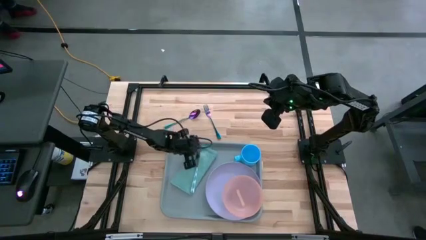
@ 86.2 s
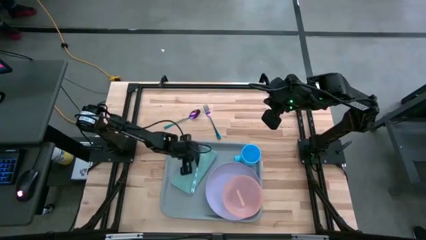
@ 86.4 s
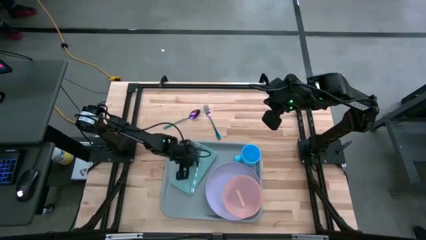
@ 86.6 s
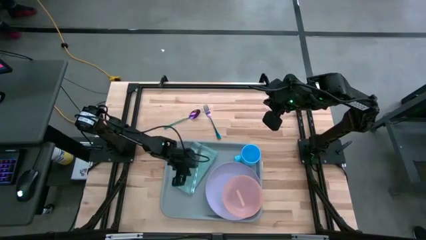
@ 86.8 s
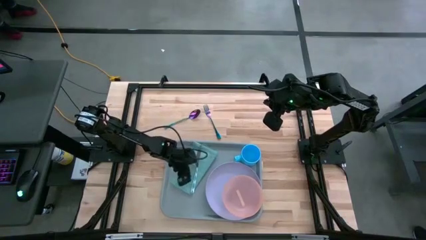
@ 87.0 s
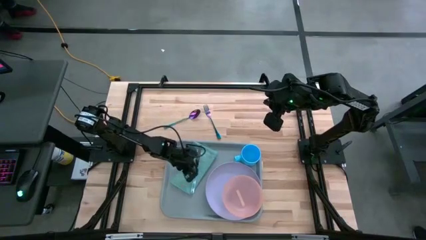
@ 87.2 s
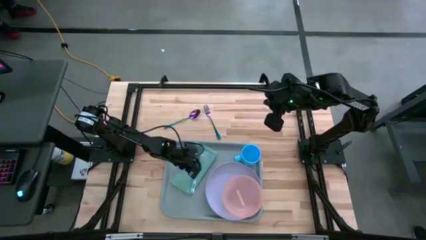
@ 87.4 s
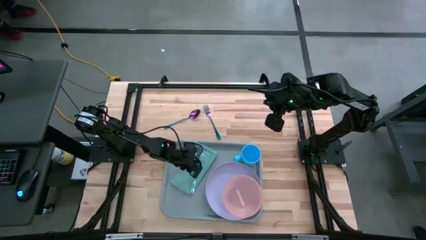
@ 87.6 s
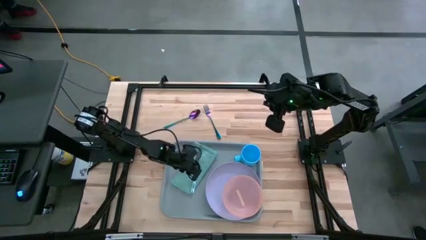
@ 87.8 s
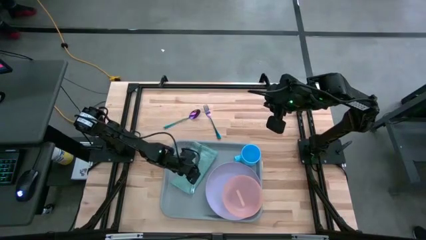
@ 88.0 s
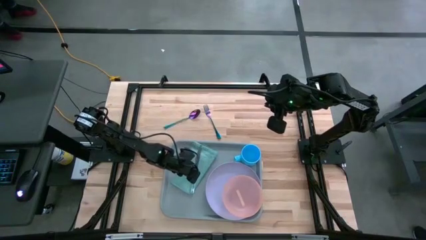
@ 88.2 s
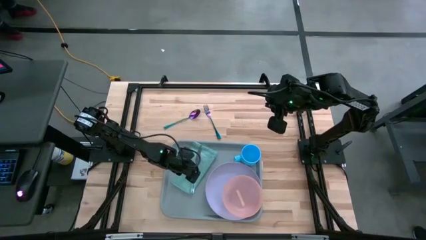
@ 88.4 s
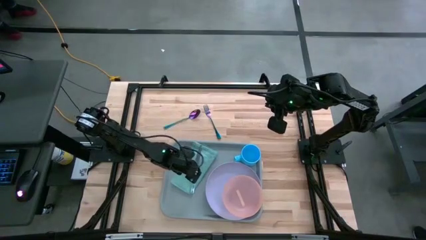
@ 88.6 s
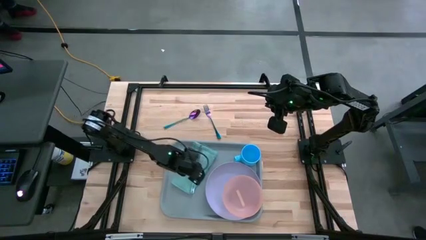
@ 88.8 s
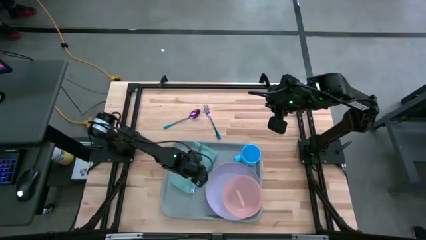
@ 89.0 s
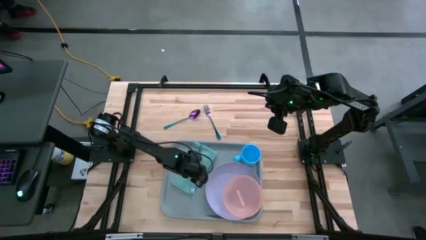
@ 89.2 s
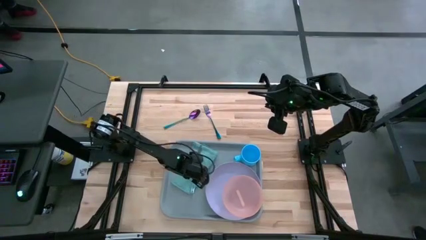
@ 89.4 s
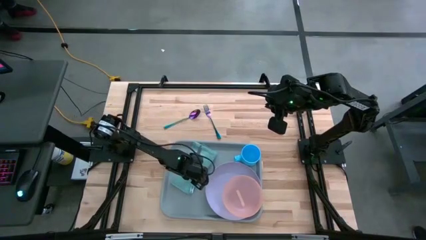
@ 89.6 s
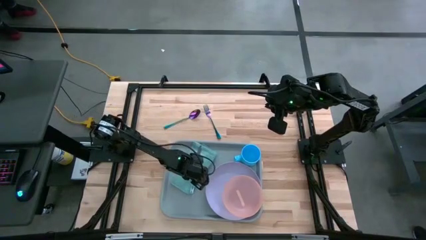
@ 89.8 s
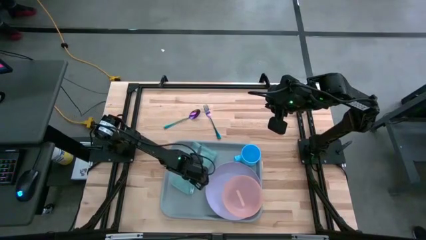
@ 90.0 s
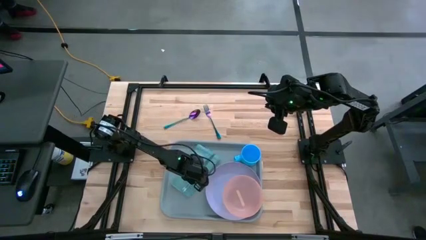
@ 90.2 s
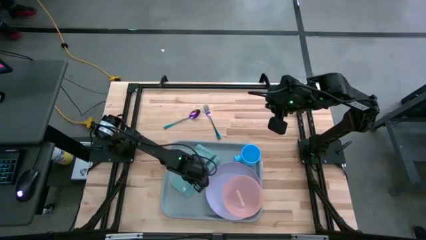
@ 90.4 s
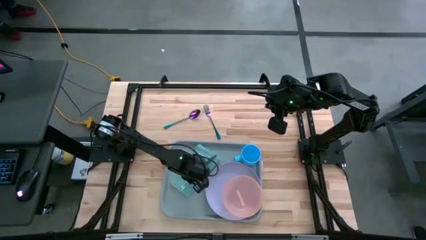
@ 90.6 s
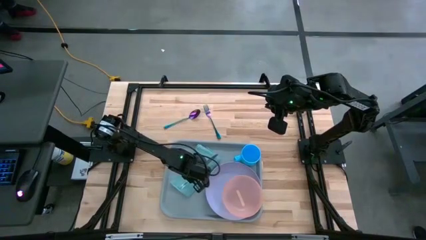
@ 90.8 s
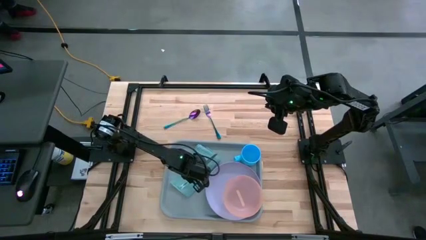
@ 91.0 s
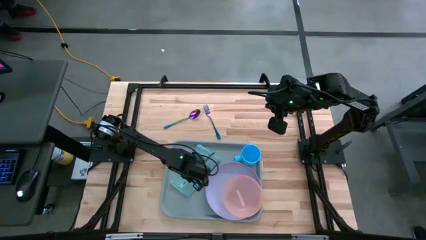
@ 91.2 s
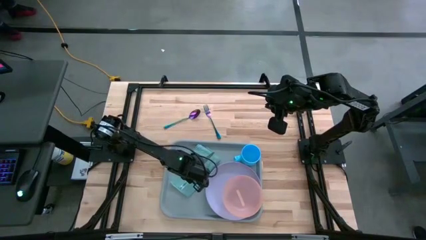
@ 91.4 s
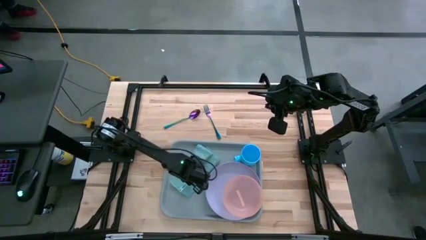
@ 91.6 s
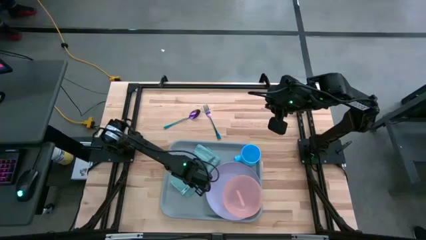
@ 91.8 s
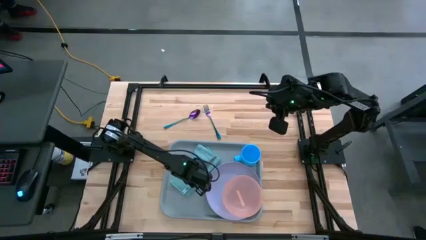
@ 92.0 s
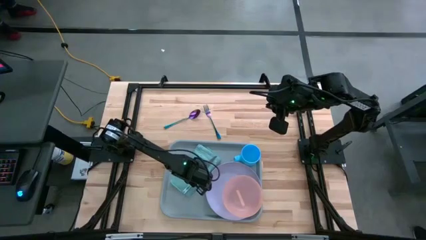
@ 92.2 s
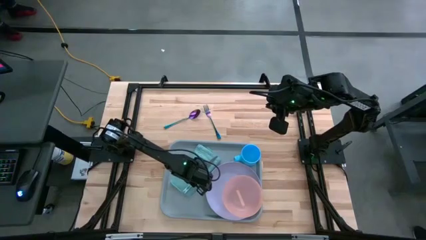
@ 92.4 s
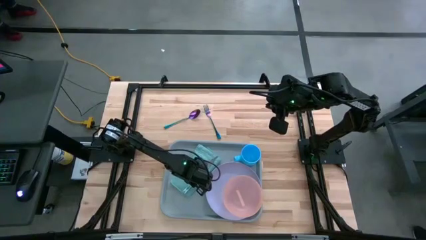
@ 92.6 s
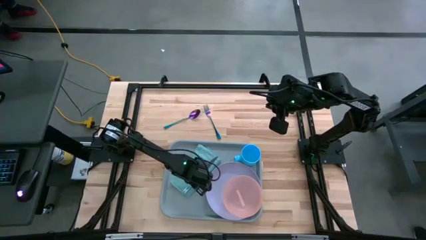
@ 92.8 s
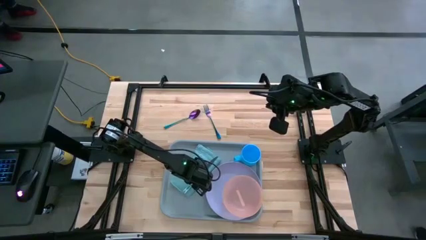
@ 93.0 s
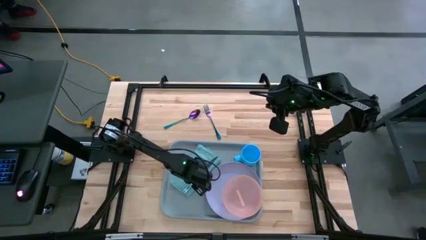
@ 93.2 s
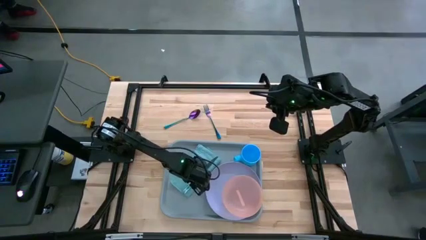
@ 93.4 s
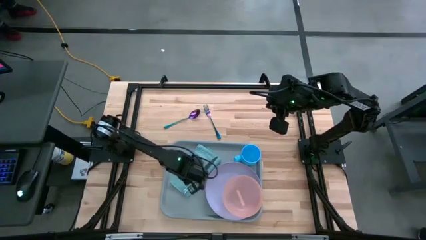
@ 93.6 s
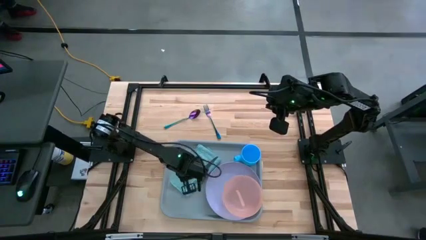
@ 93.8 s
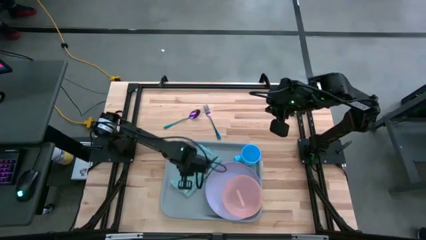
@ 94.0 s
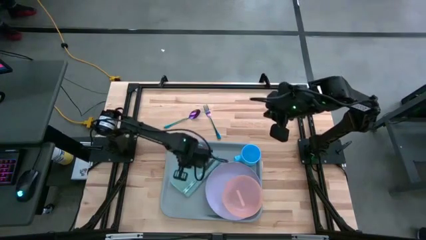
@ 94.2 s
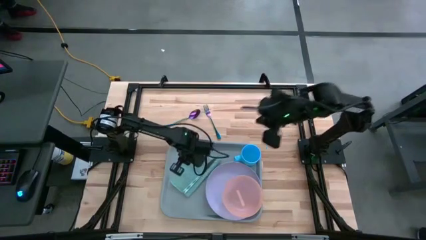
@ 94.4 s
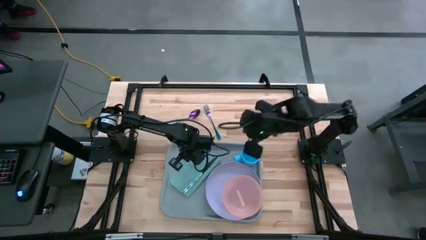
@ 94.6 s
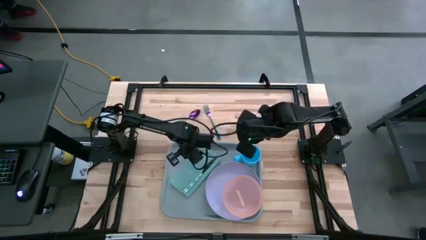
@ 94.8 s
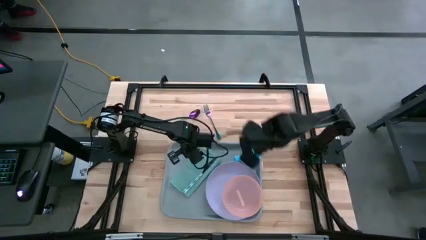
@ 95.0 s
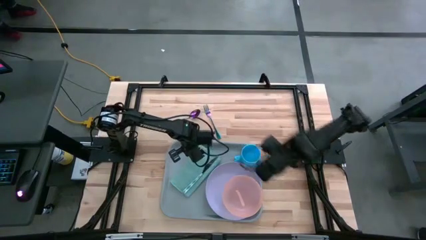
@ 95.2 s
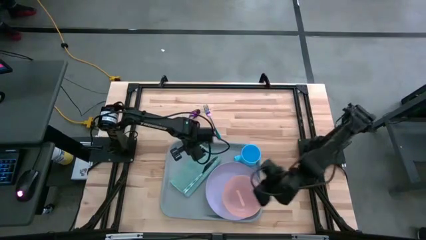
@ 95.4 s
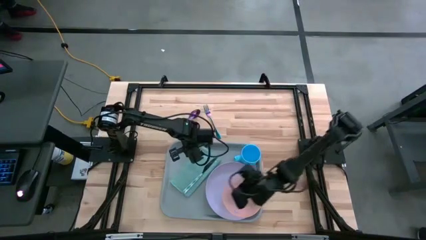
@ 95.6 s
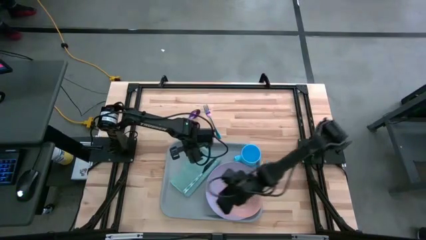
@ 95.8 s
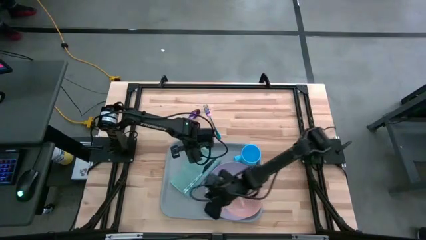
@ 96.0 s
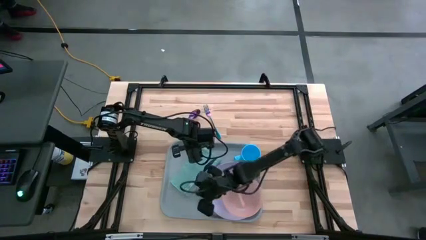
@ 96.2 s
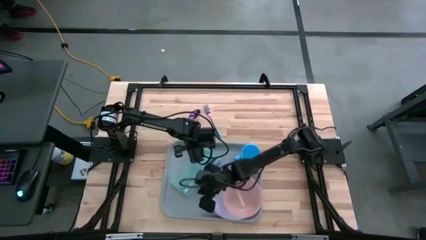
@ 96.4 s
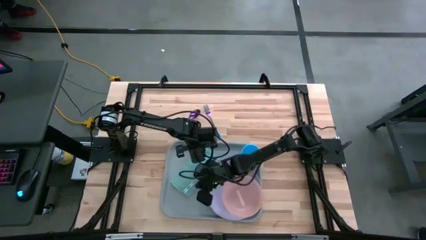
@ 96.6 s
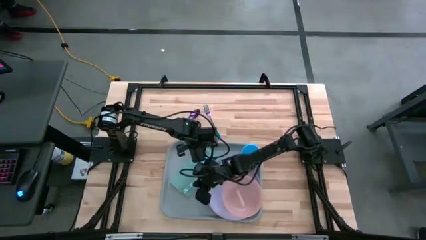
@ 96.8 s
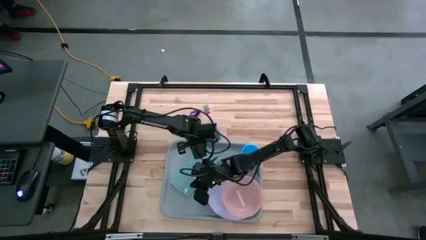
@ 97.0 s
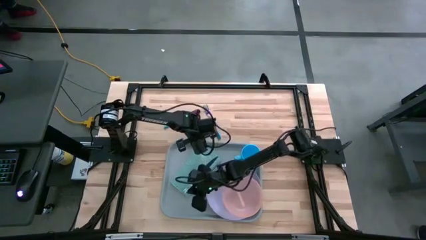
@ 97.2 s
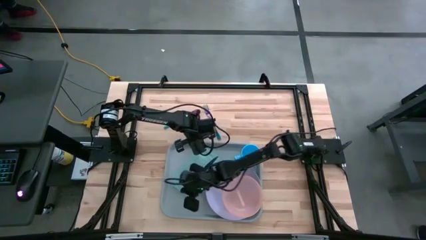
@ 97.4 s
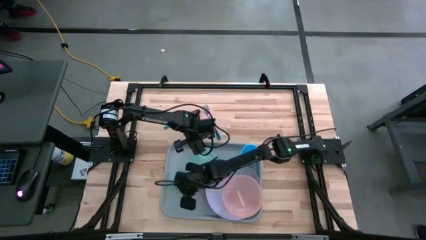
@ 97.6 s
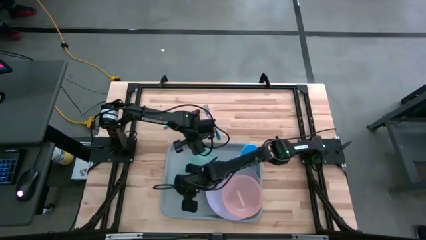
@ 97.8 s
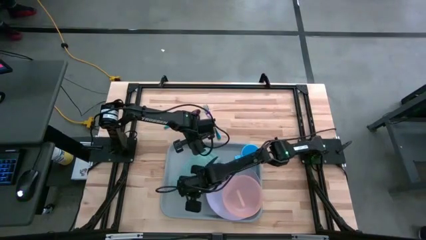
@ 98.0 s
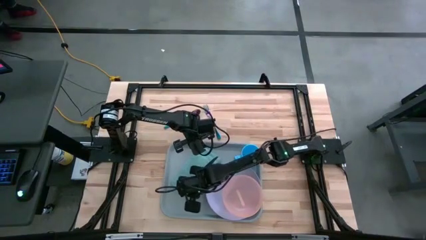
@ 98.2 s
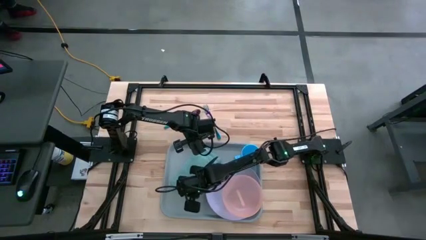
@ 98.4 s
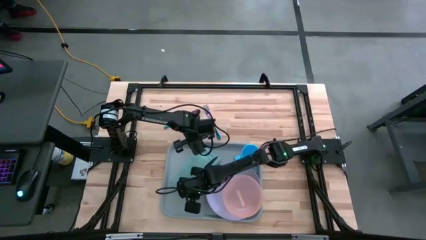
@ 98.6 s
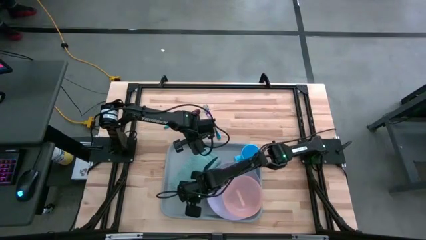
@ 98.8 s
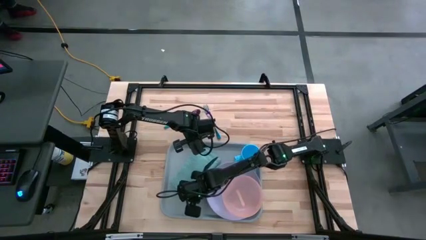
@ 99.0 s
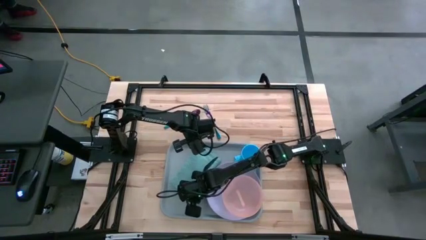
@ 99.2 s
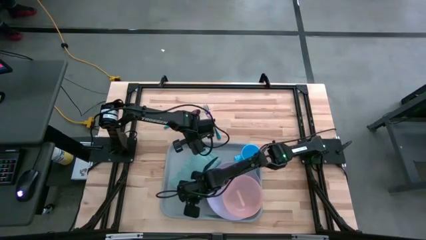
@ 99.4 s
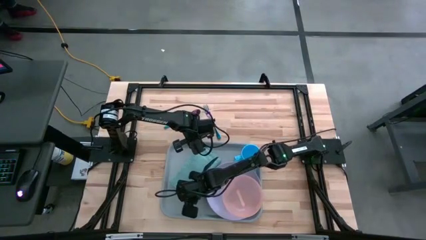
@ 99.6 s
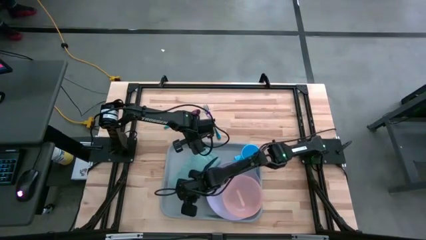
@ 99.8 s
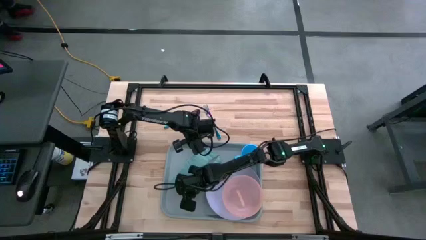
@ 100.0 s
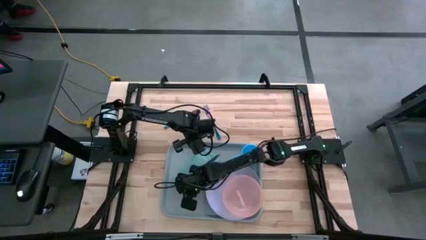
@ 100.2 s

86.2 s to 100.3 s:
Task: Set up tray
Adjust the green knife
